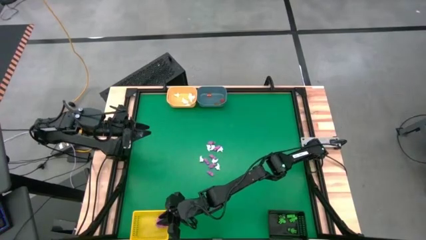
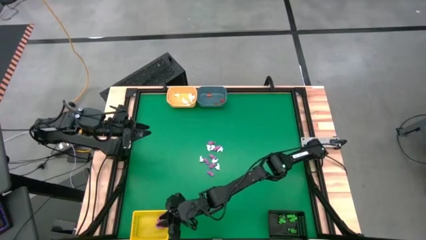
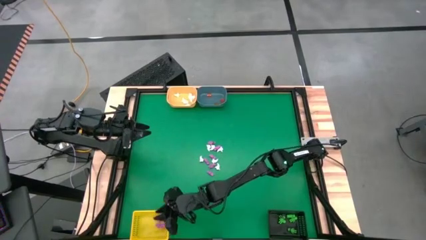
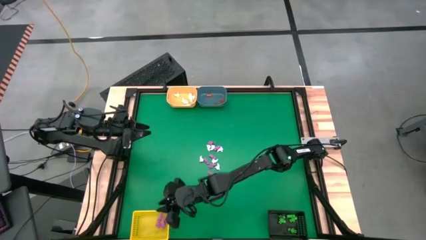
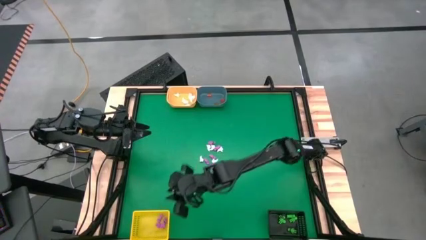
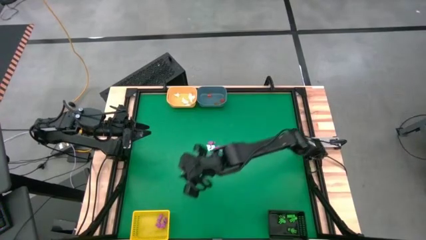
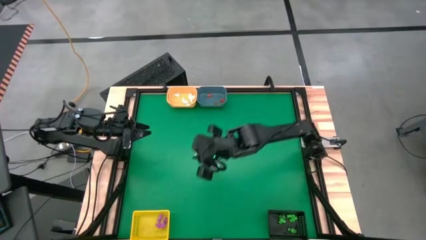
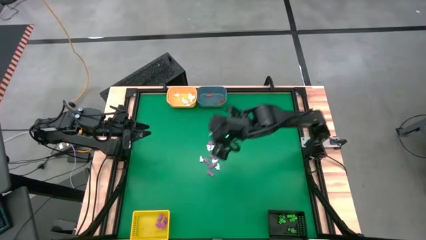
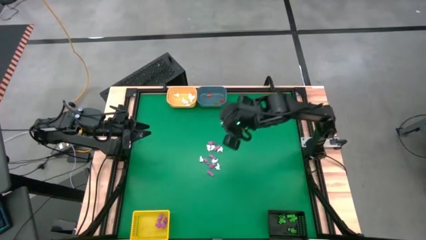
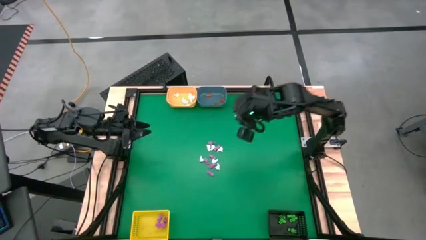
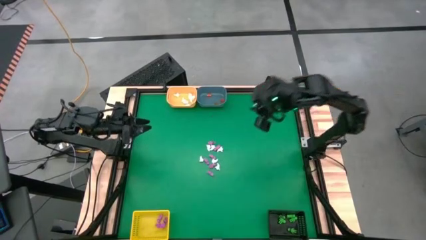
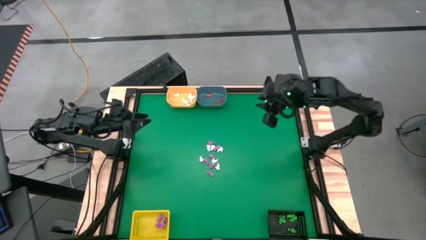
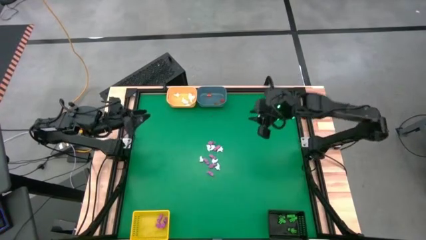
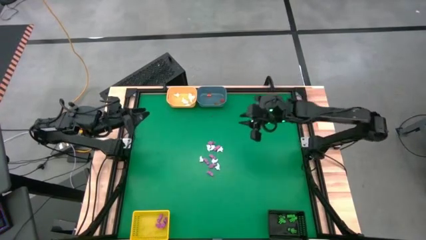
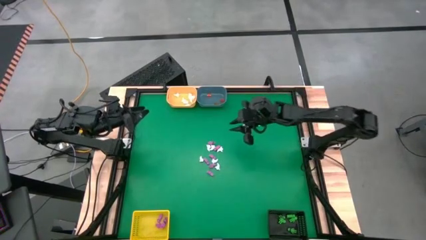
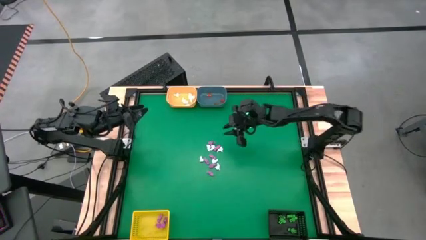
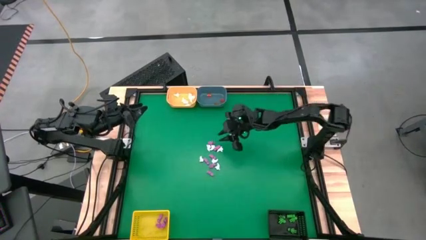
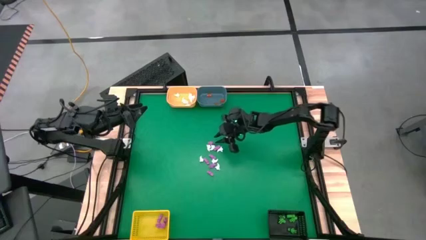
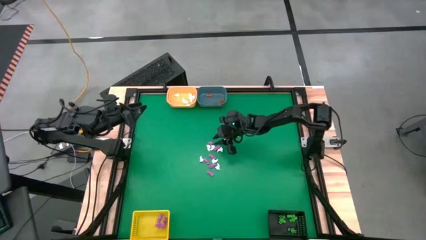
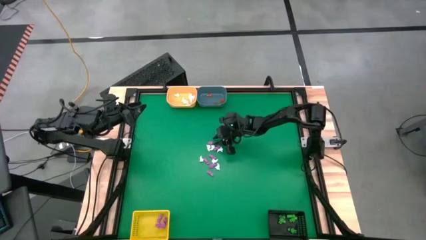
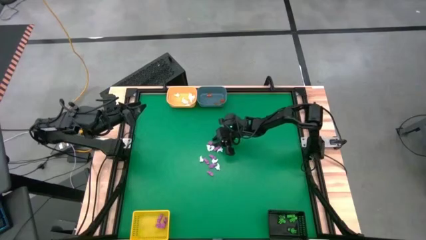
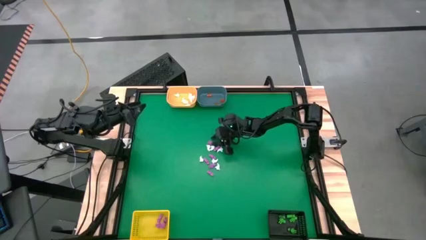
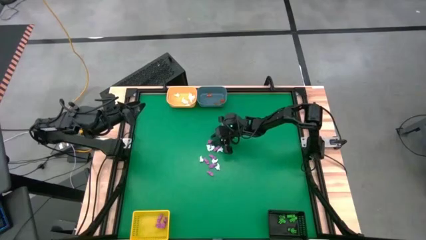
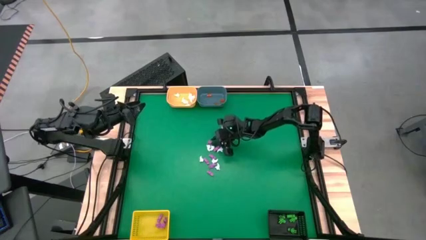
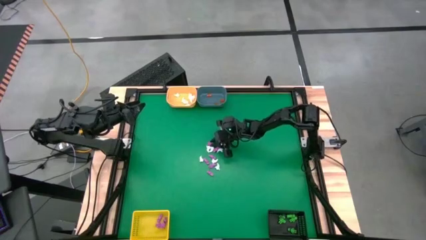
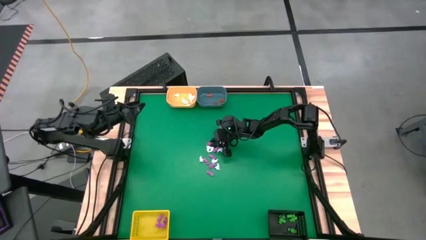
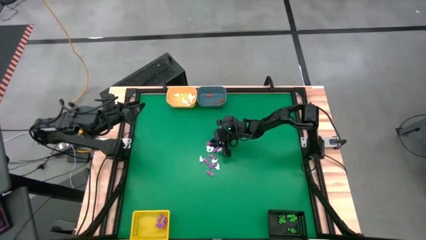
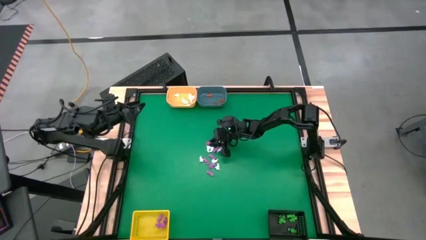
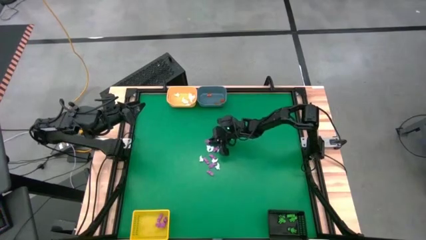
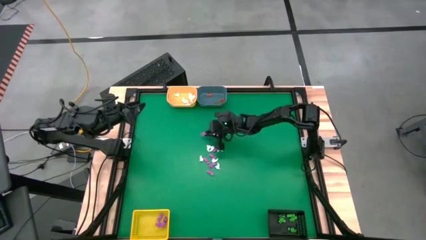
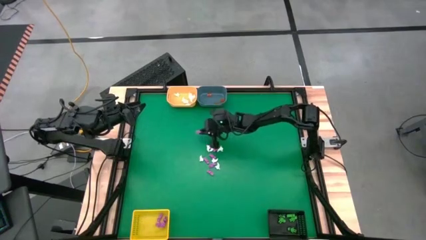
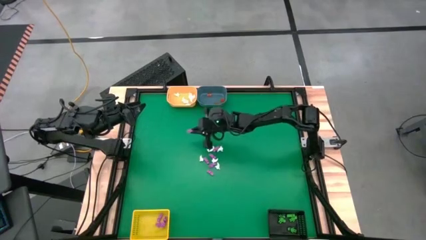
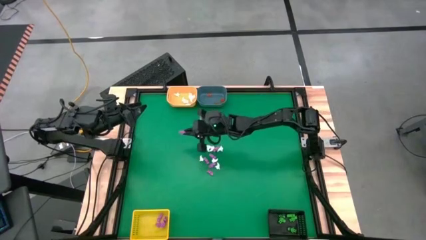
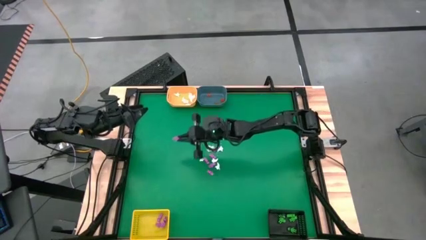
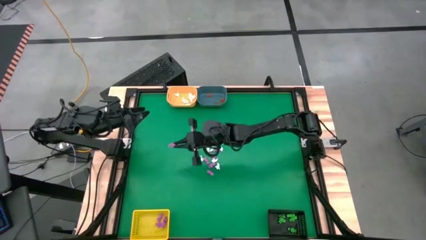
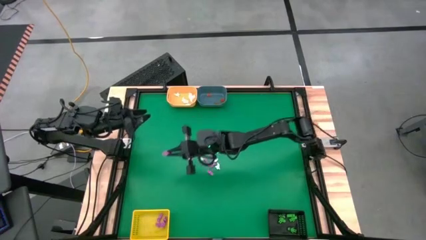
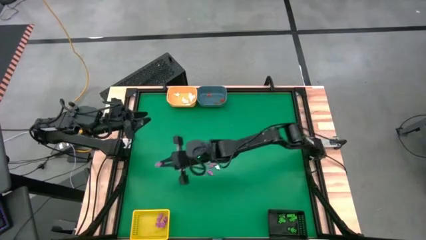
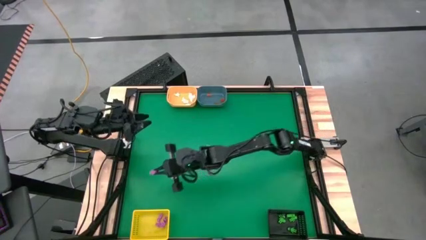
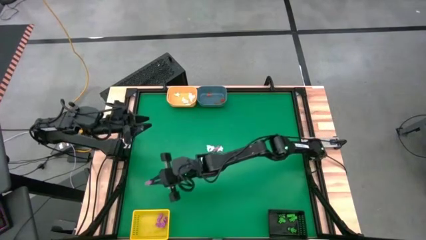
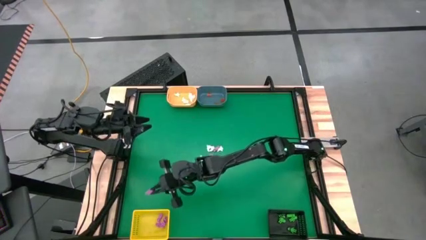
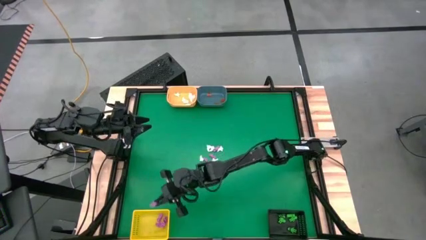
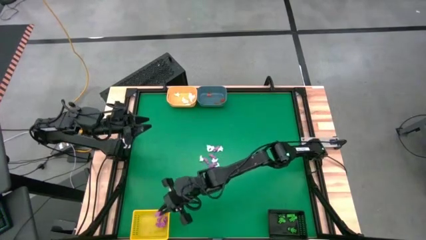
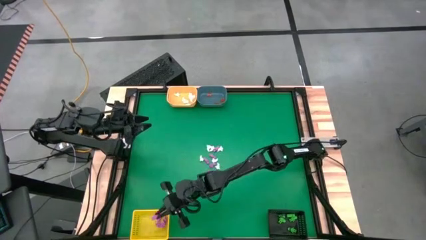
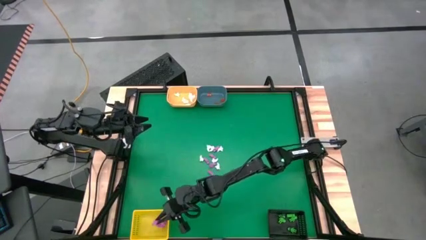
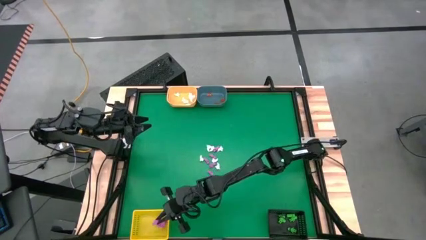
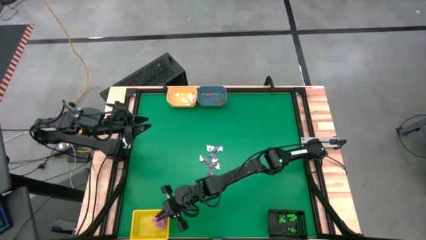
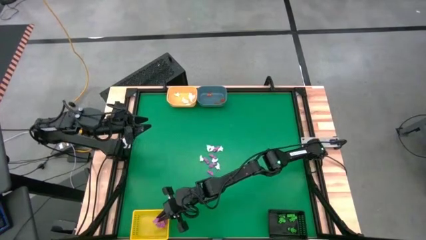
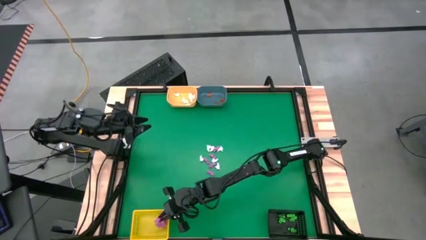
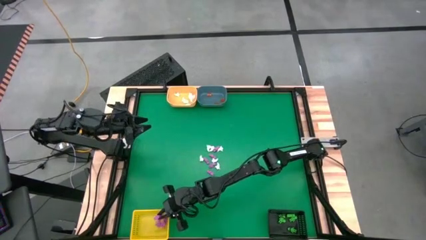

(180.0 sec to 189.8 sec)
Task: Sort Halloween decoration
Put the pink skeleton into the yellow bin

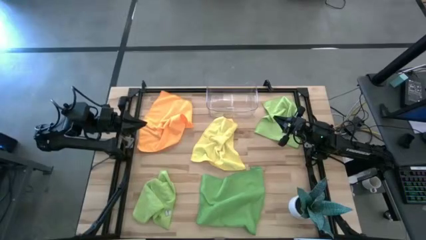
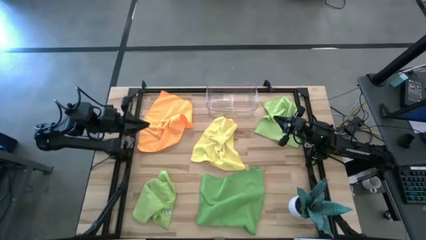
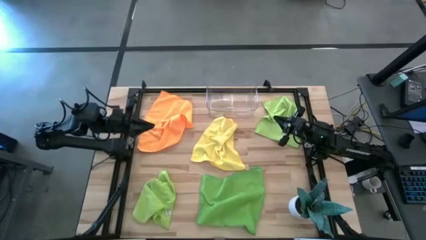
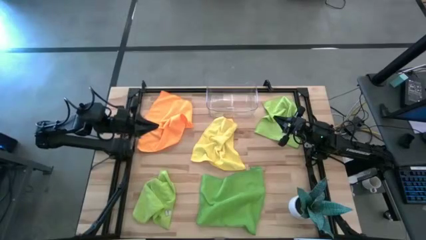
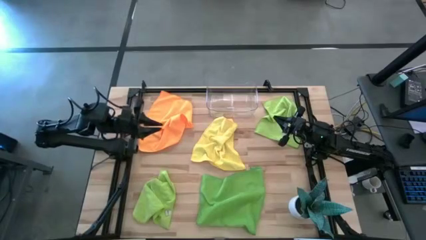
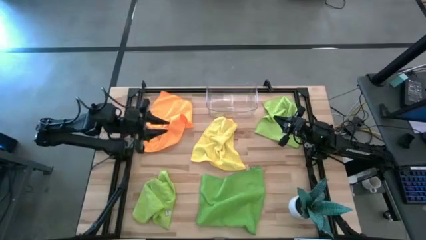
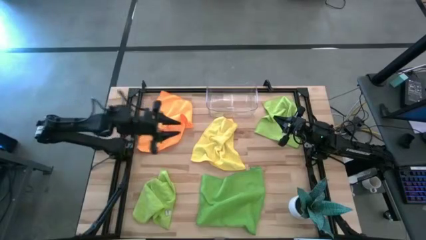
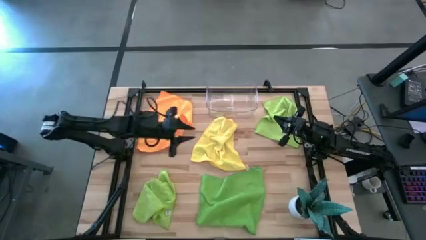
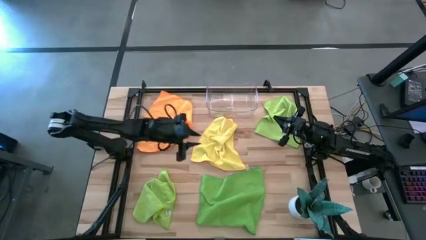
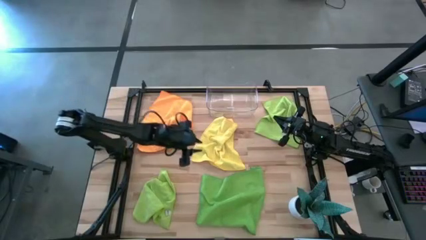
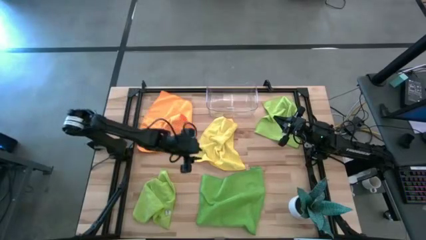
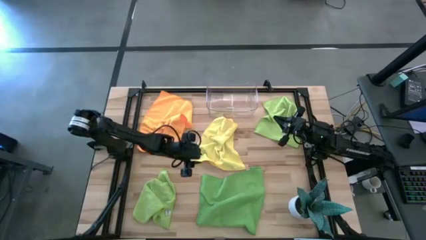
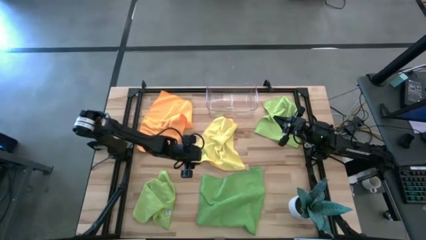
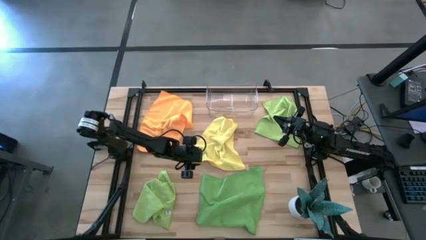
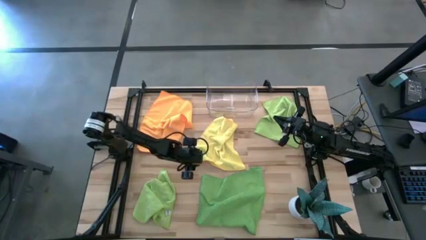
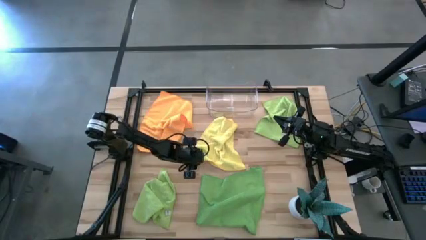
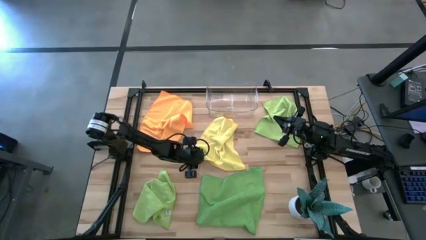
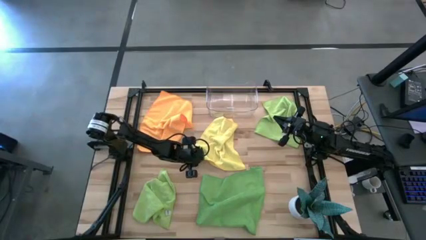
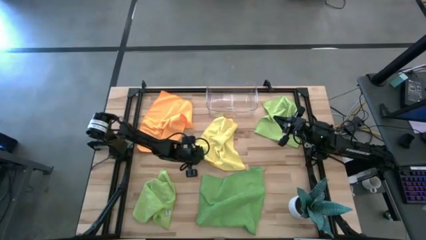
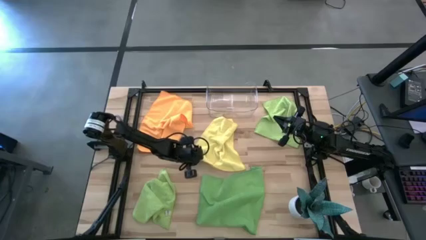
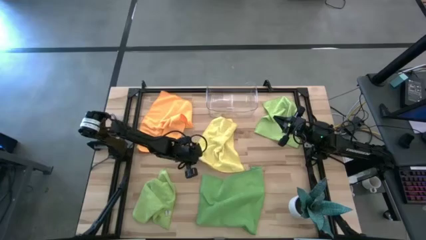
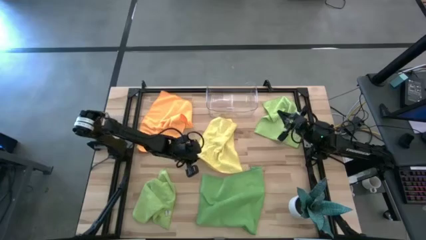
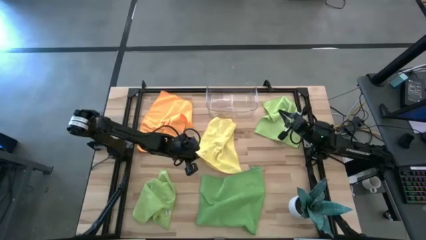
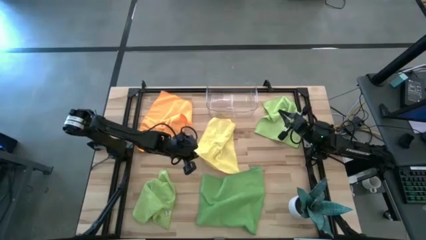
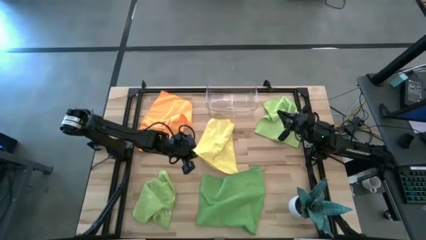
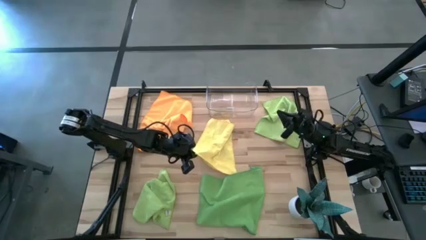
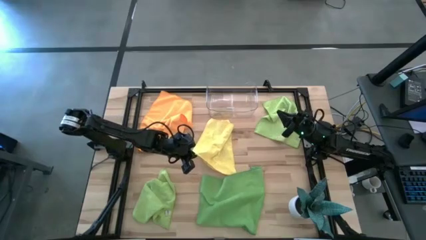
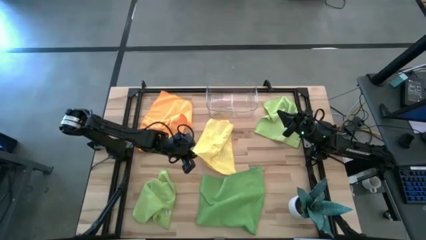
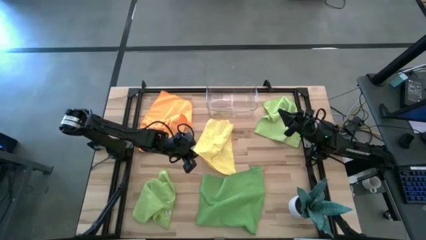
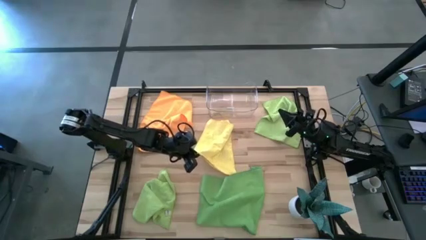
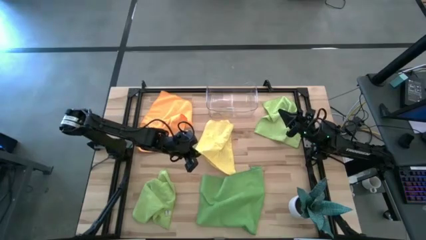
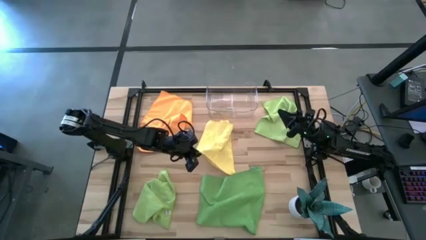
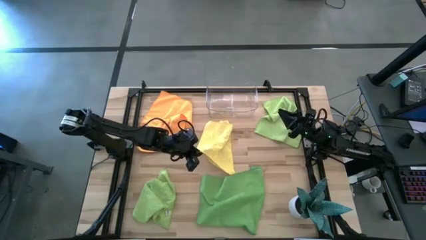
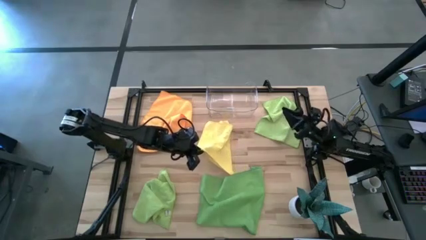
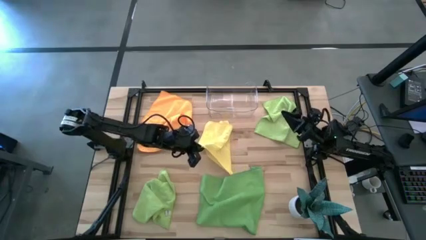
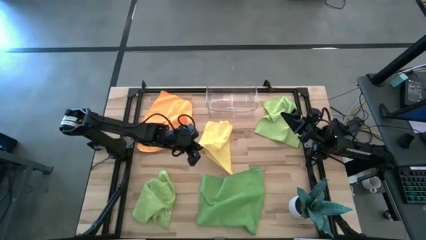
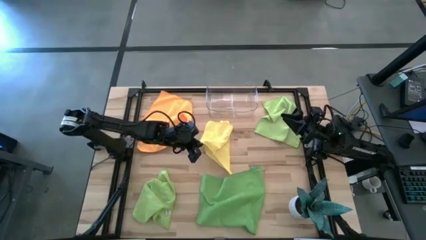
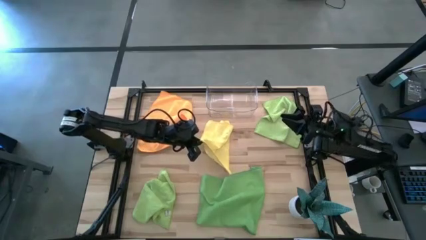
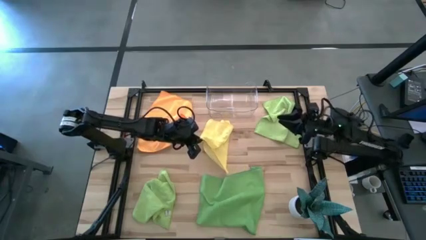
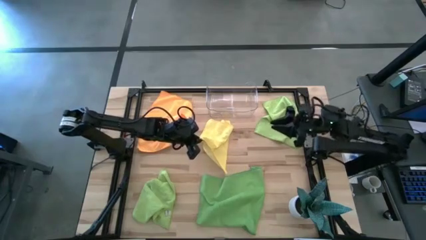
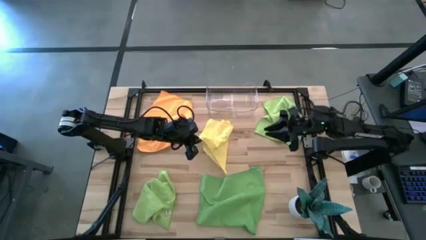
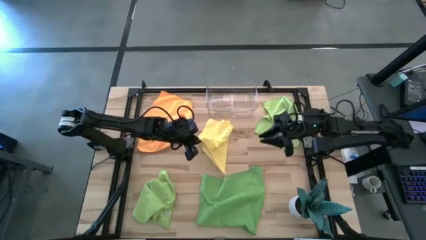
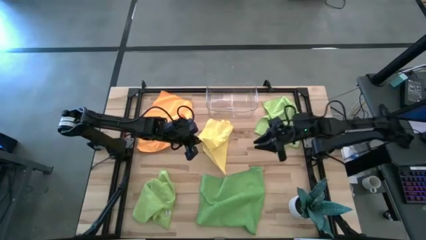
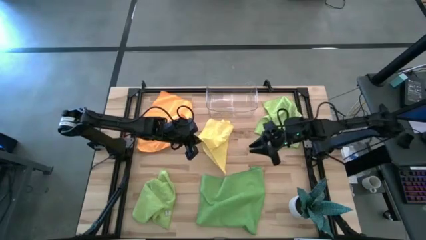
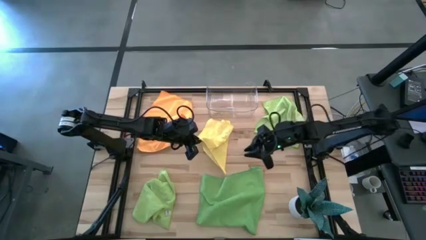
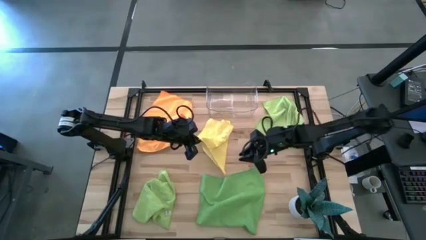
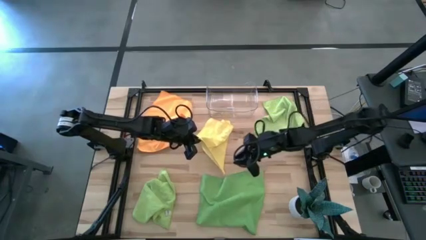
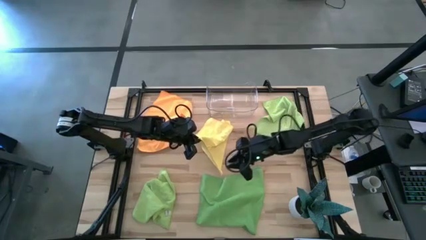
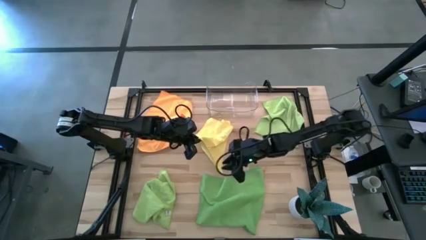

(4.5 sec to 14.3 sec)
Task: Fold microfiber towels
Fold the yellow microfiber cloth
